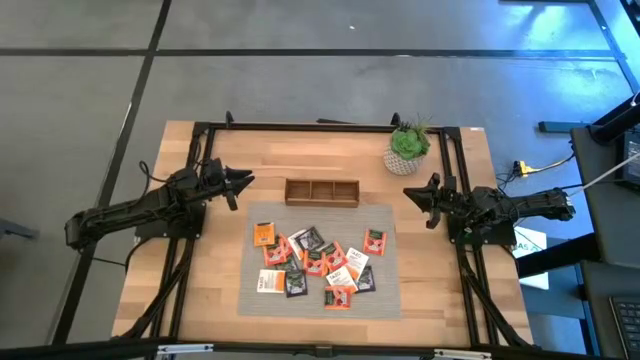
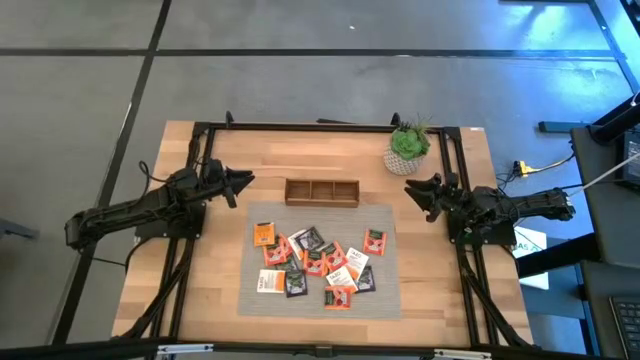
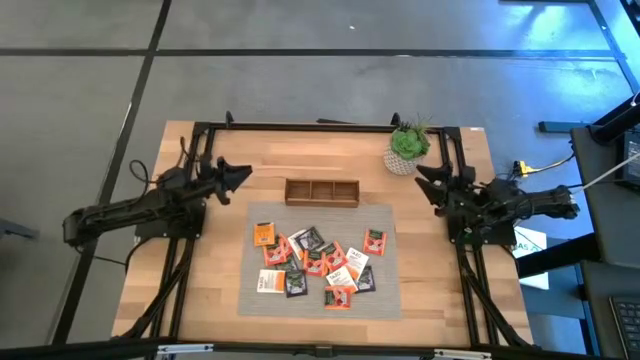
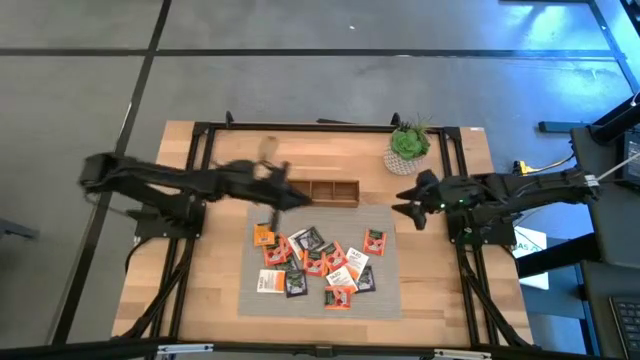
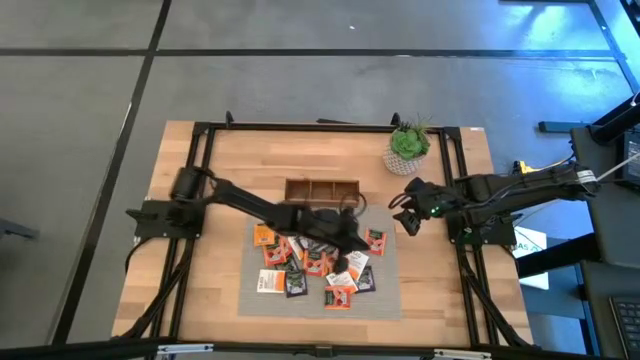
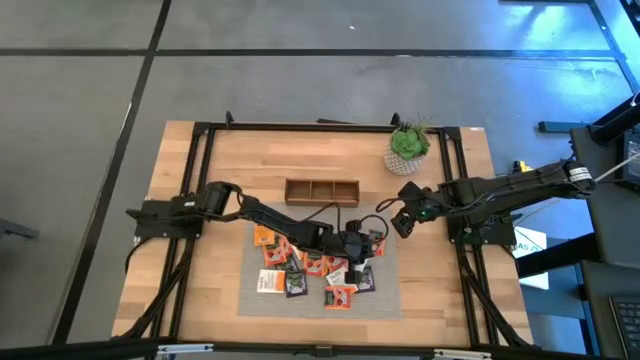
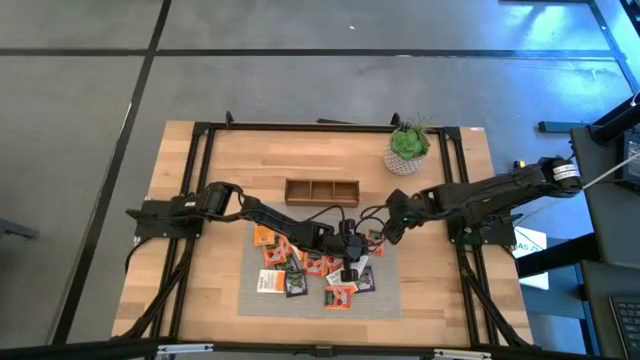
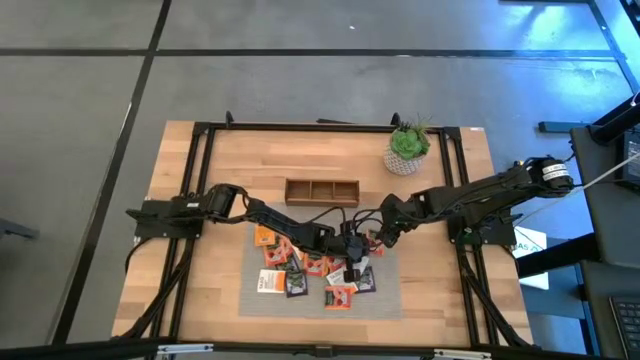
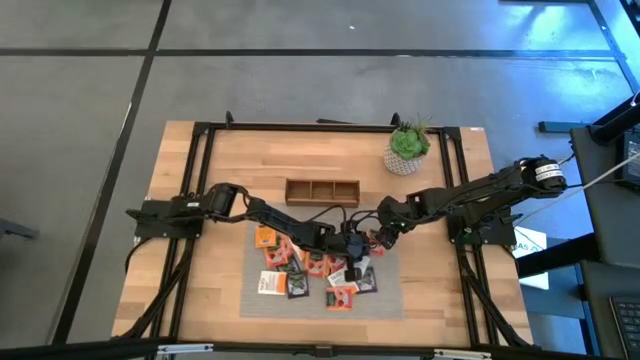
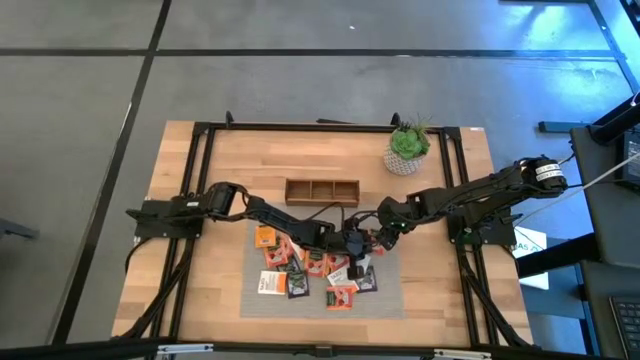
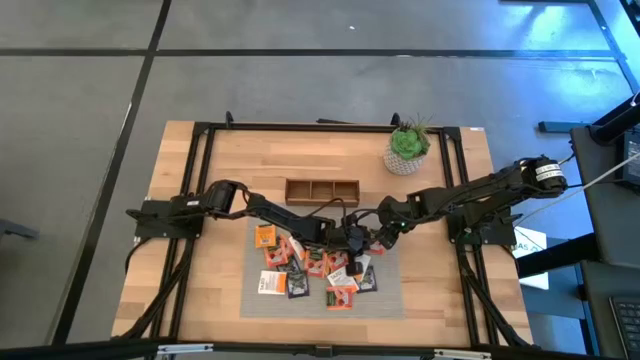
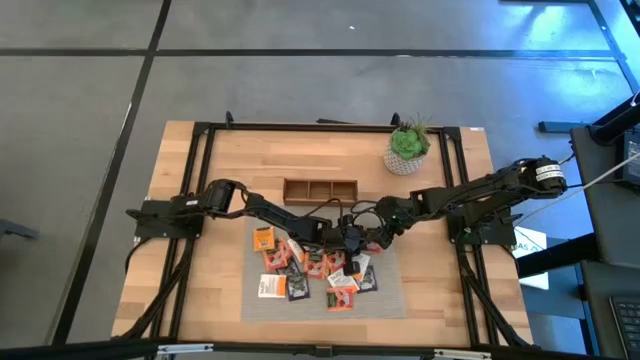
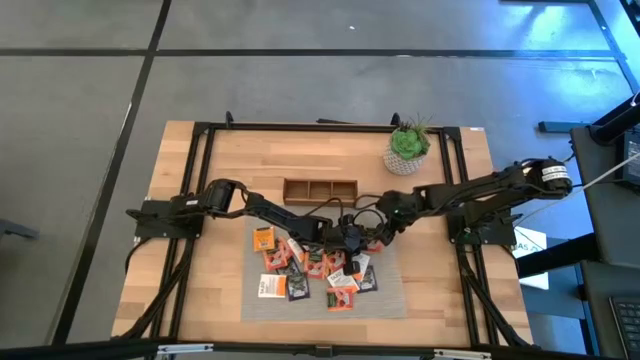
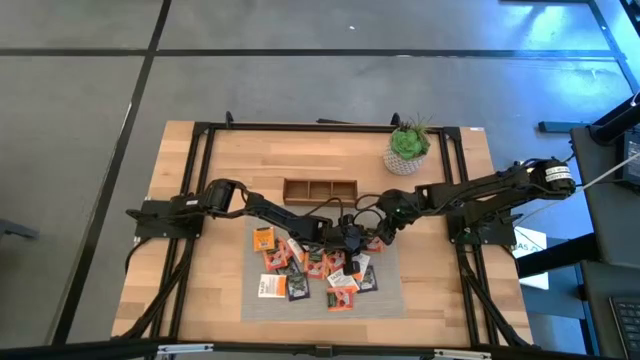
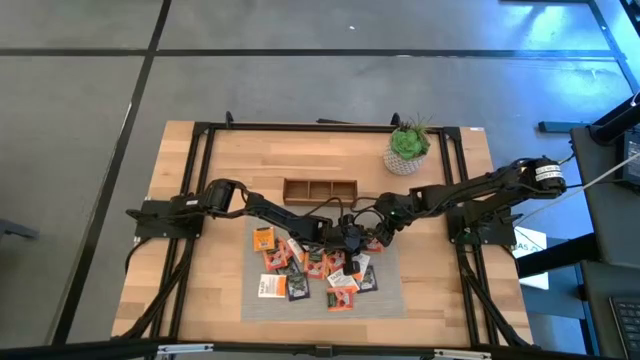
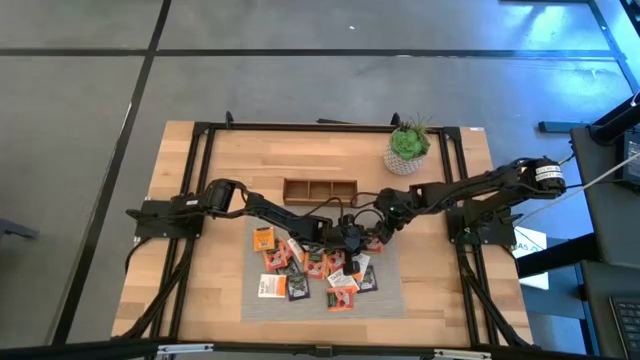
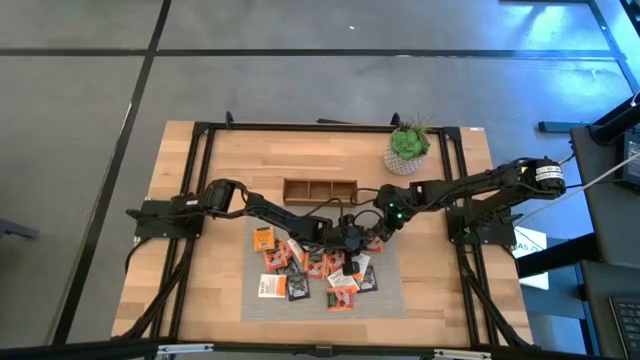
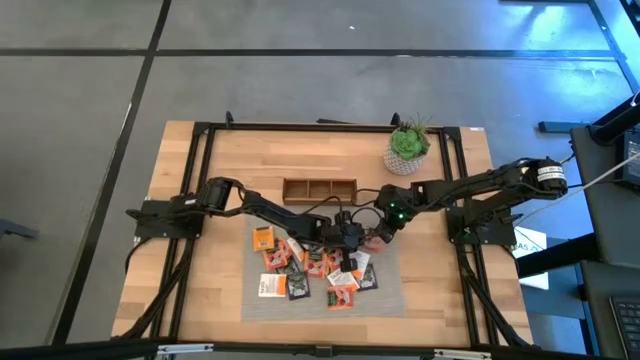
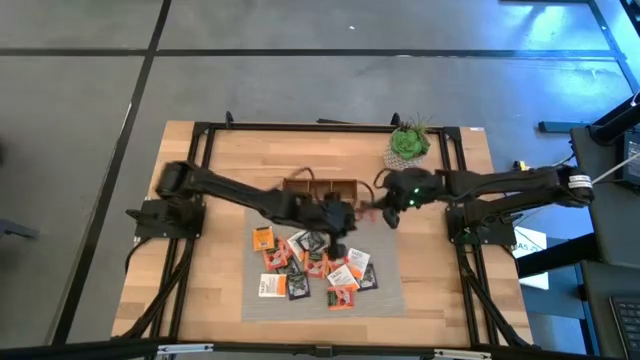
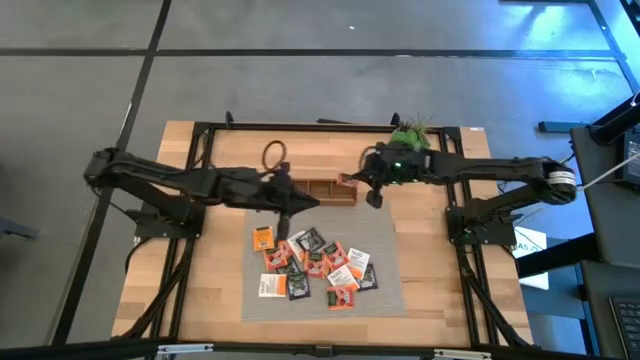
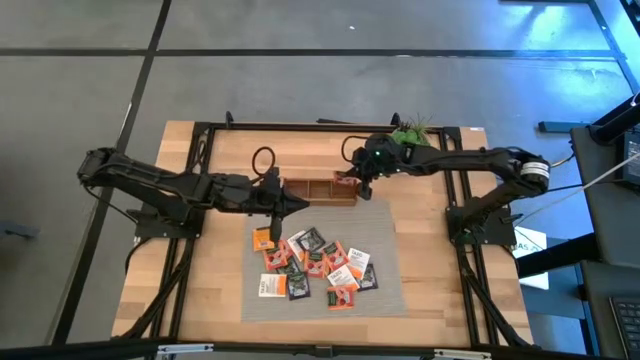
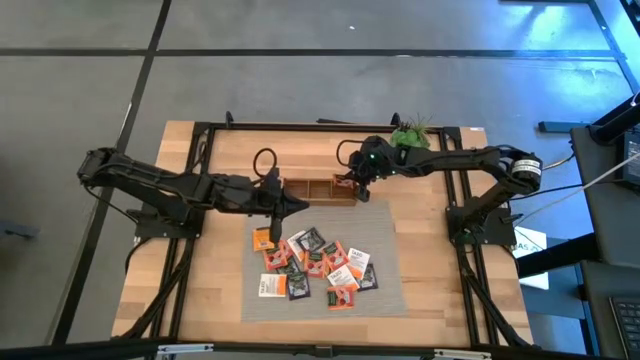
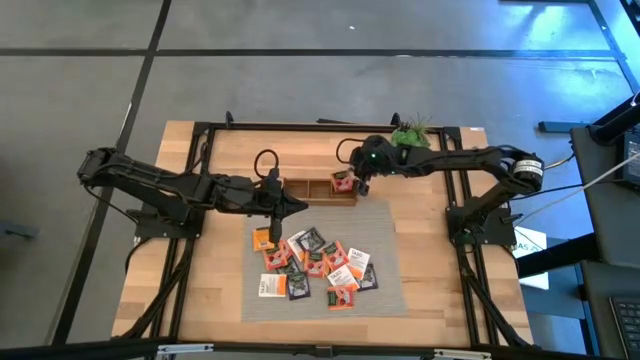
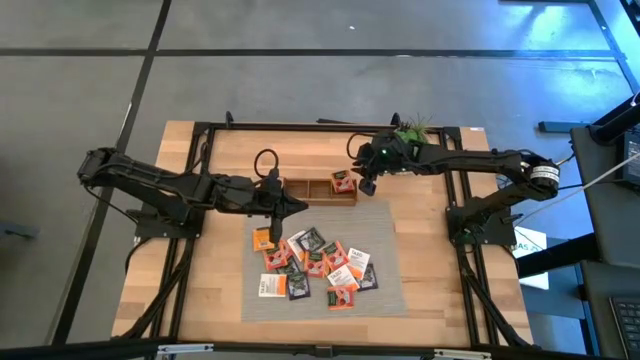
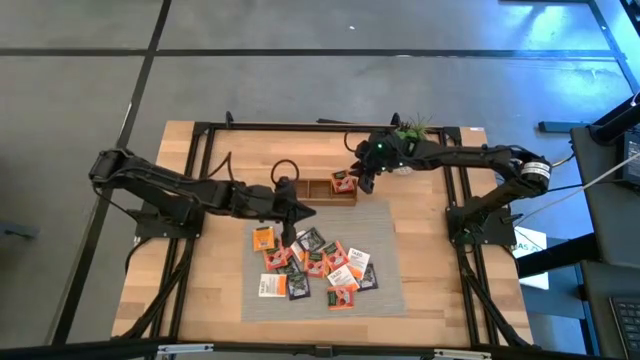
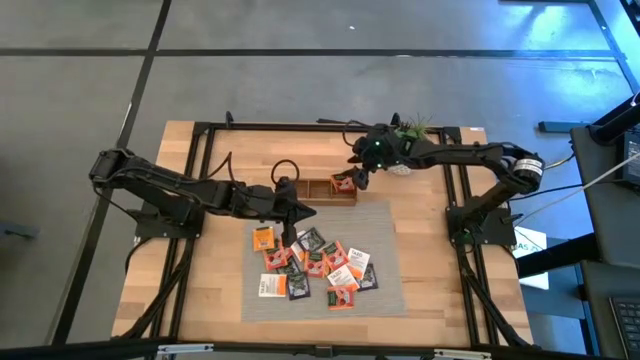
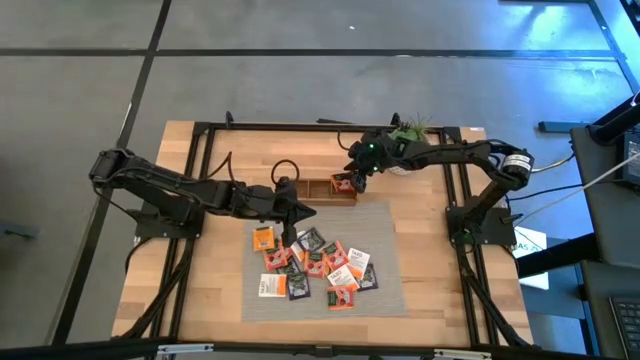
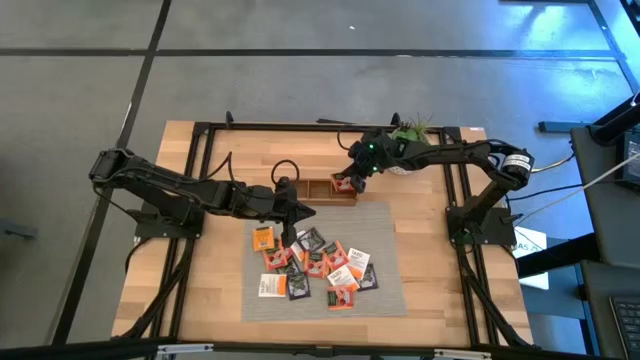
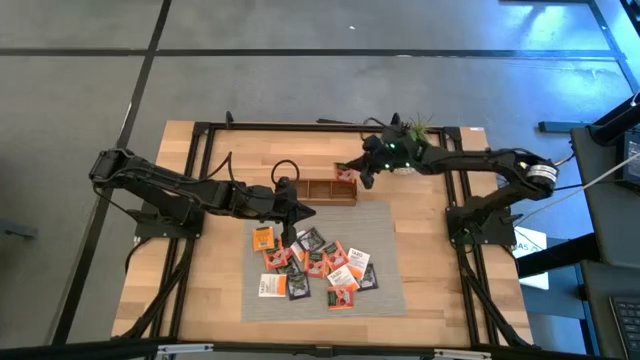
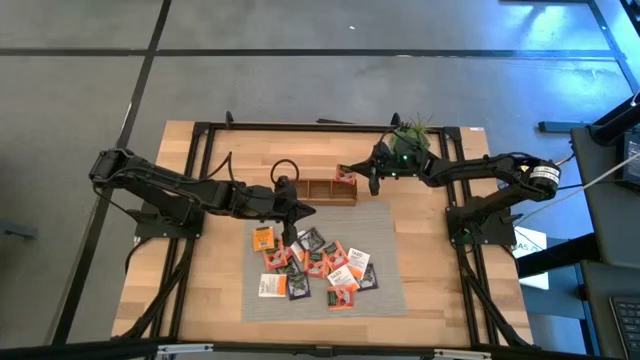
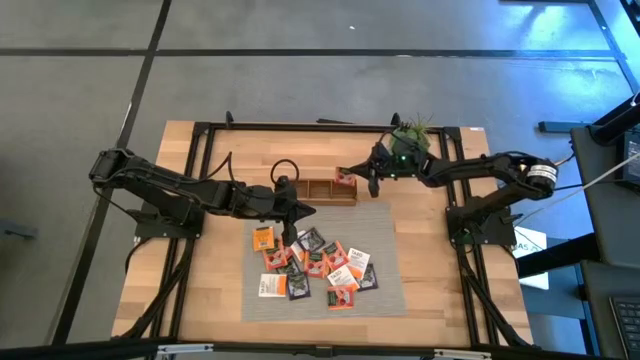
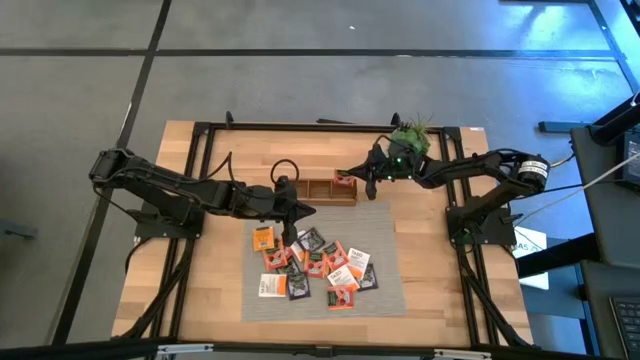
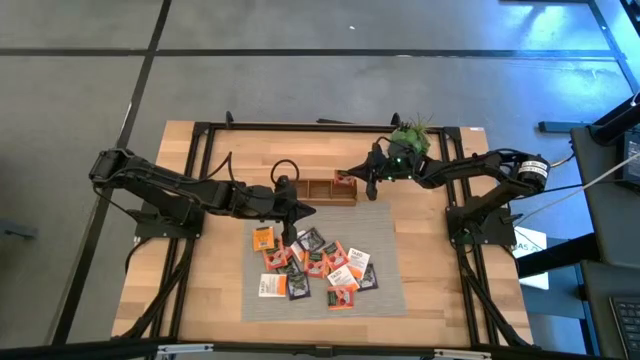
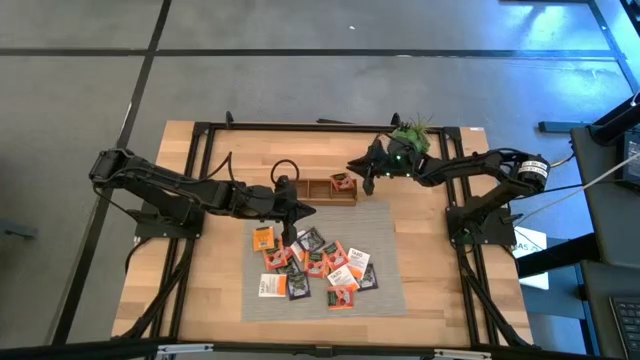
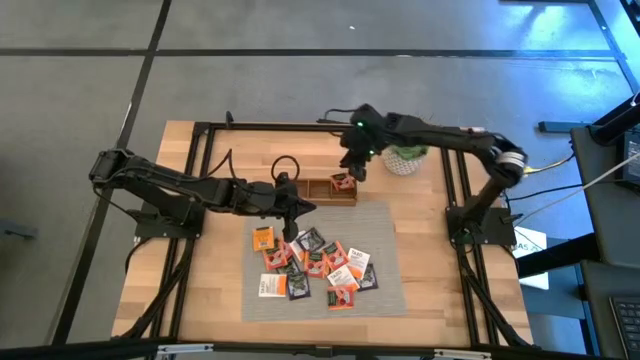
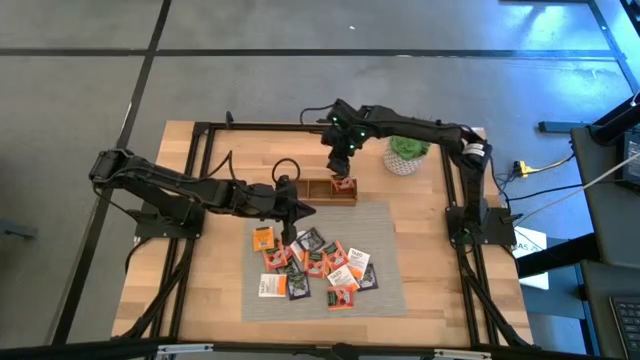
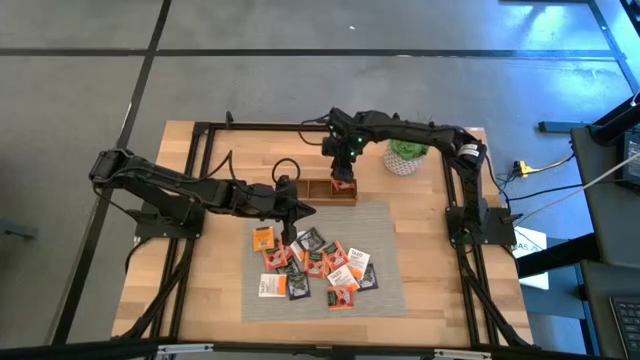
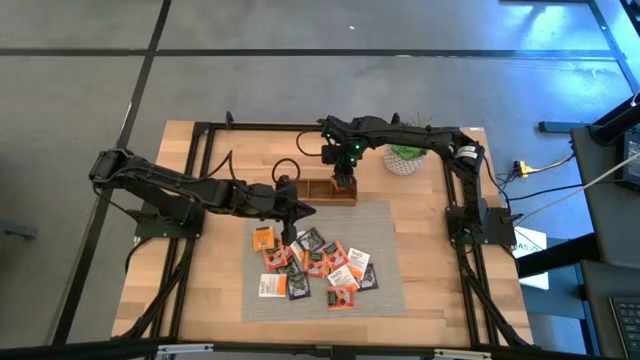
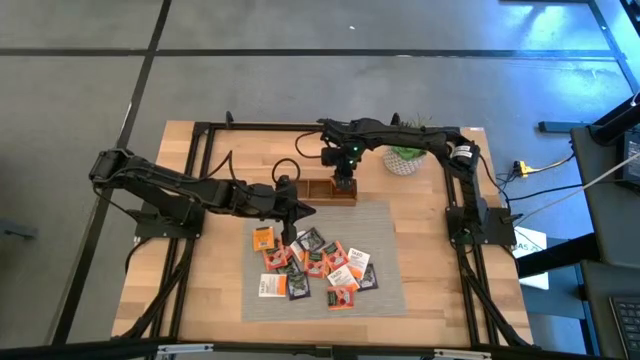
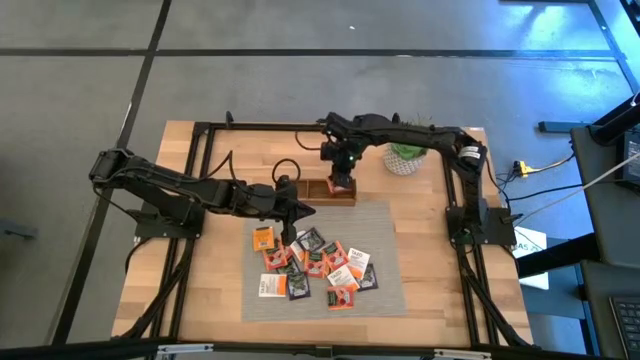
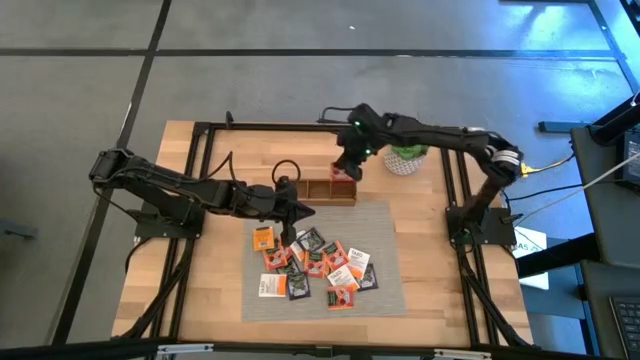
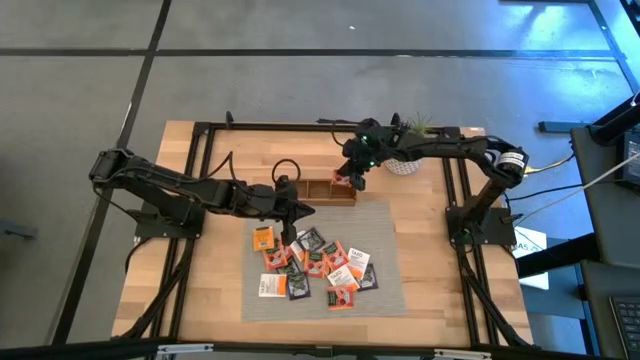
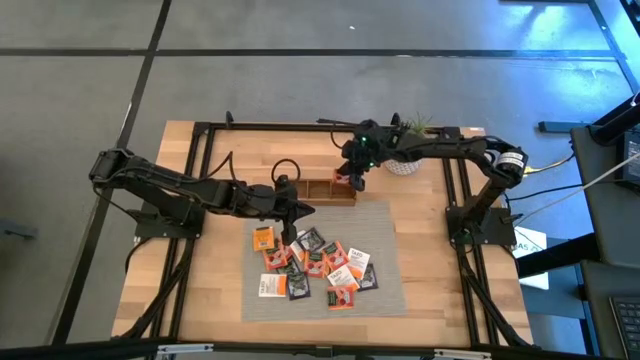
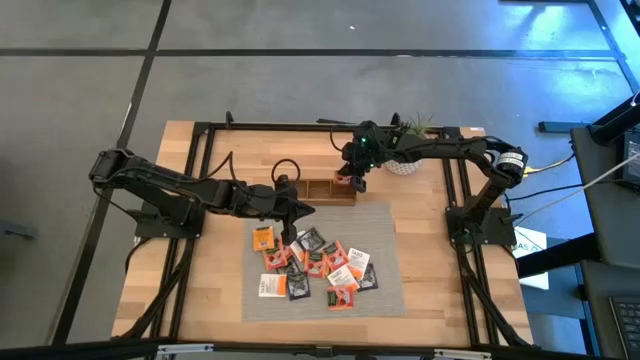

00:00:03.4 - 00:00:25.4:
Task: Pick & Place Tea
Put the orange tea bag into the right section of the wooden organizer
